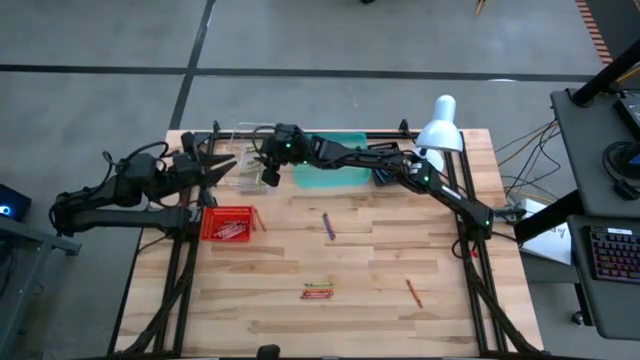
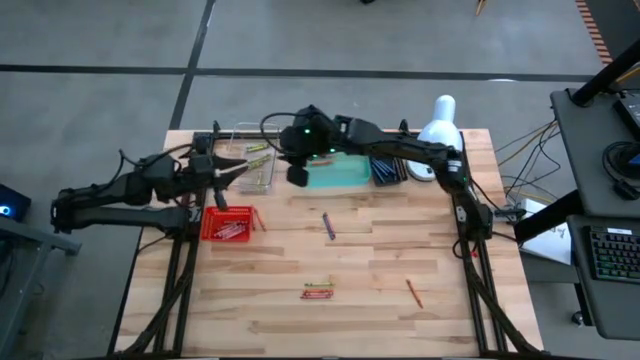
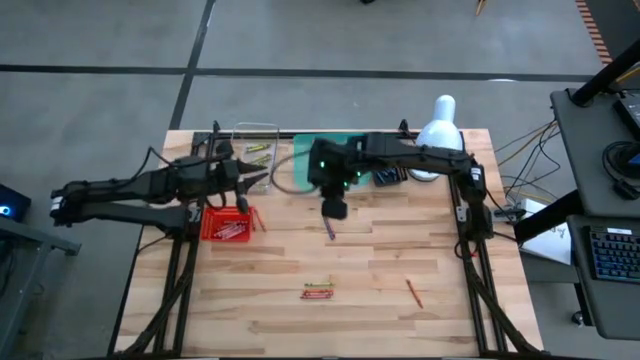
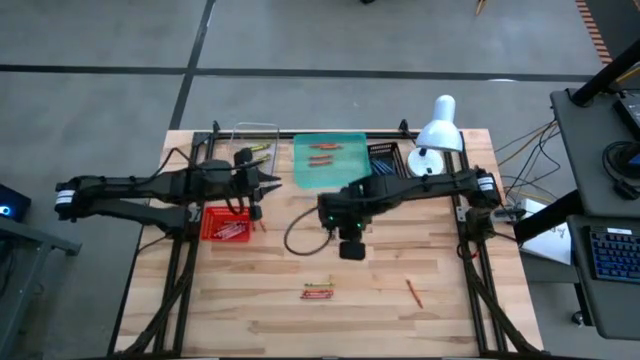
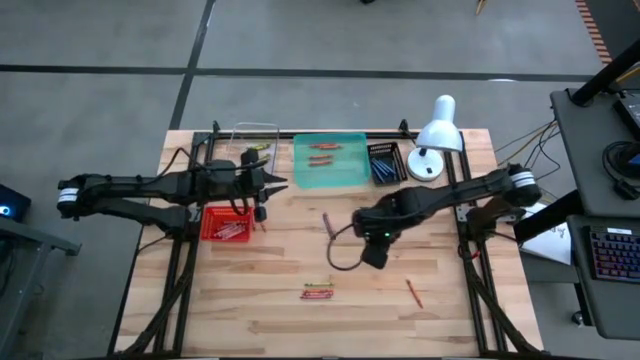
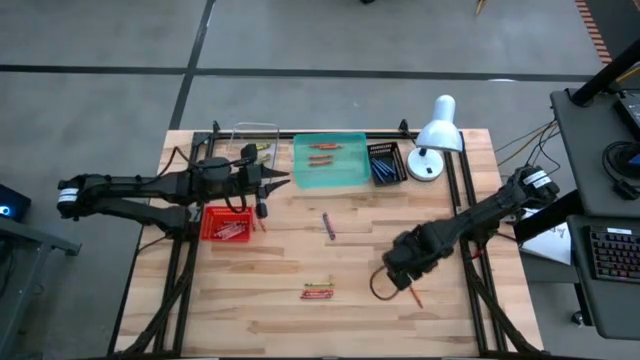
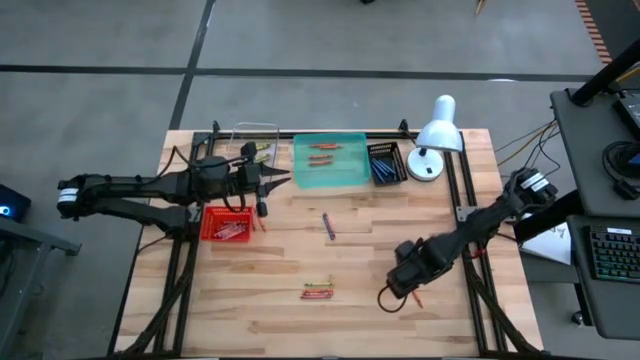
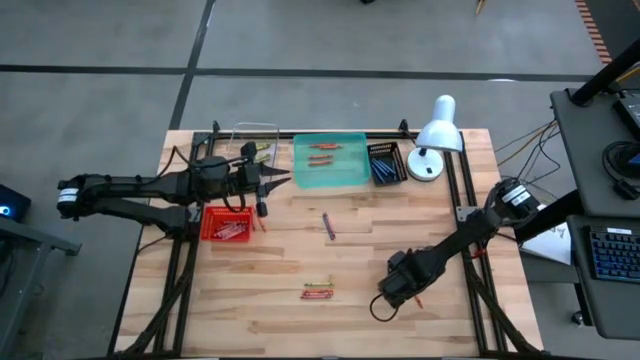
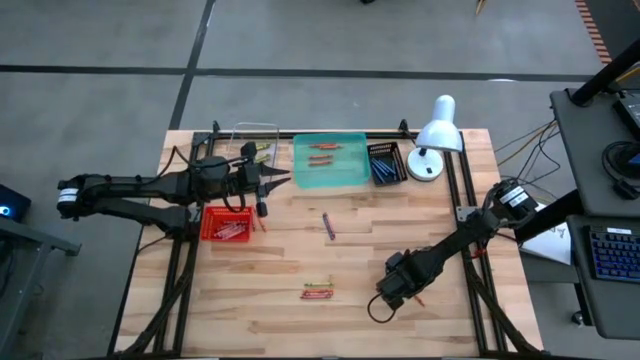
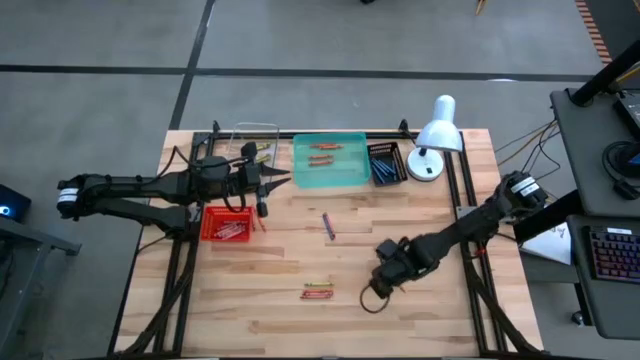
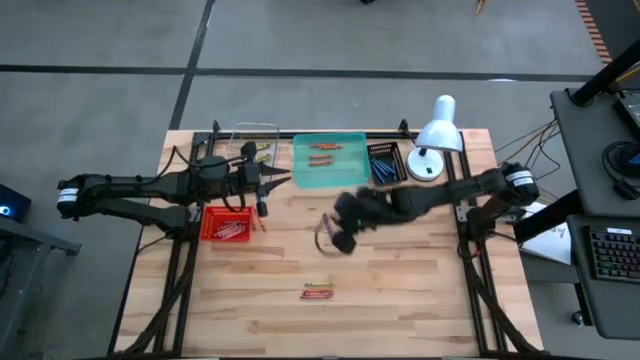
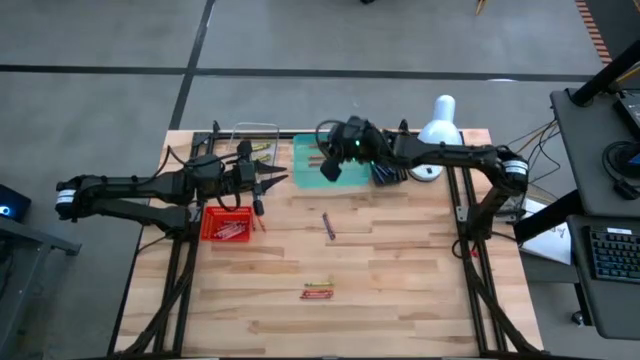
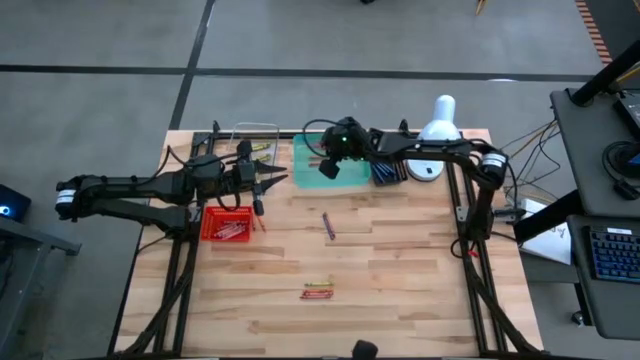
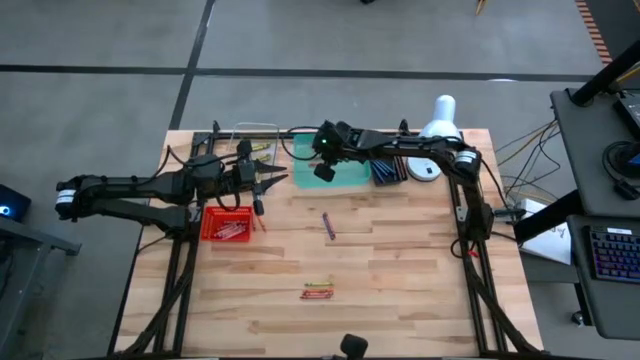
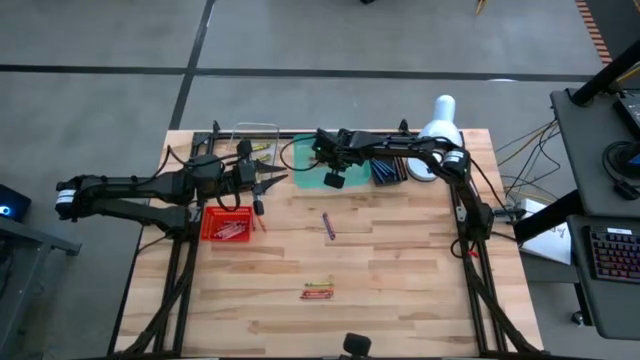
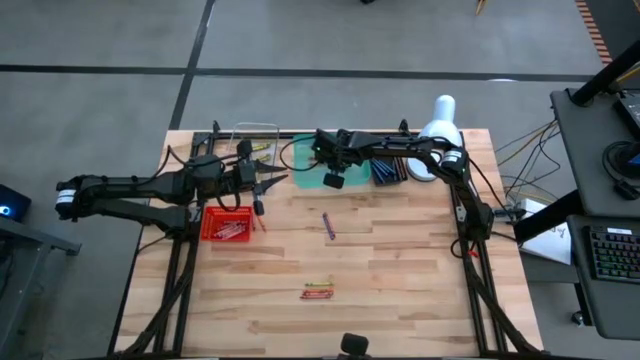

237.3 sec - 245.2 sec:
Task: Sort crayons
Put the orange crayon into the green bin

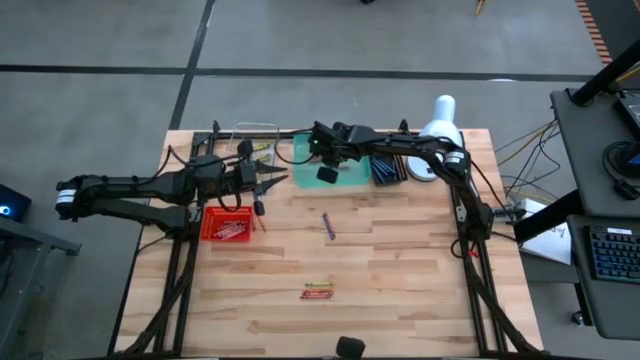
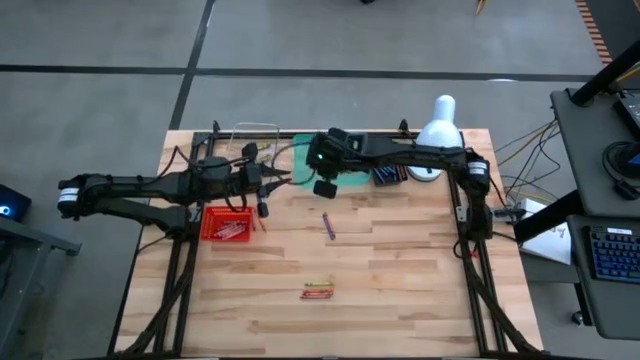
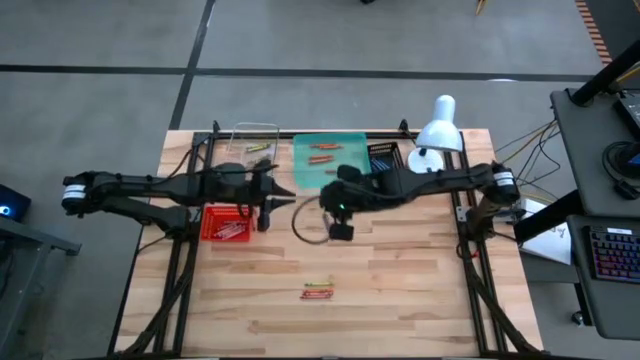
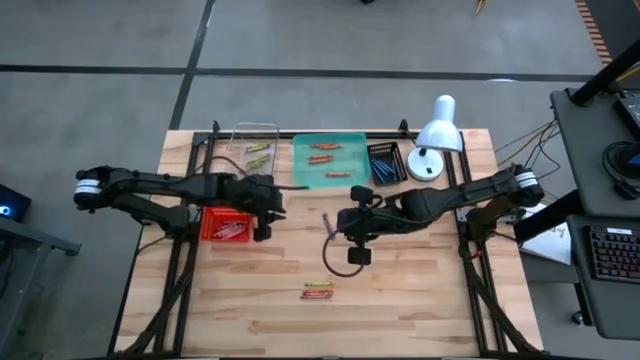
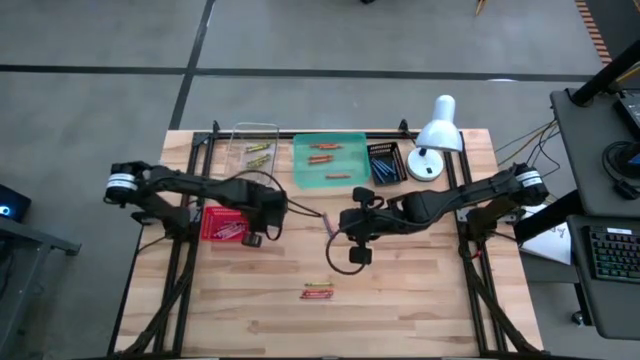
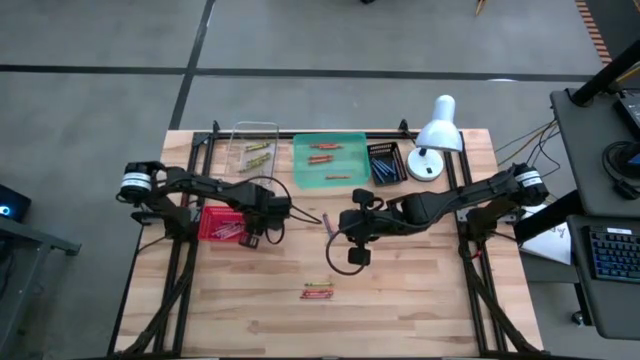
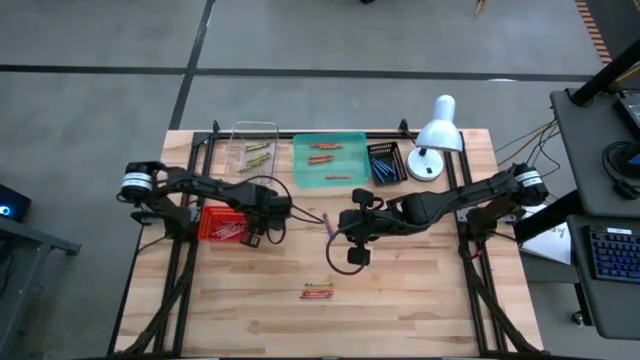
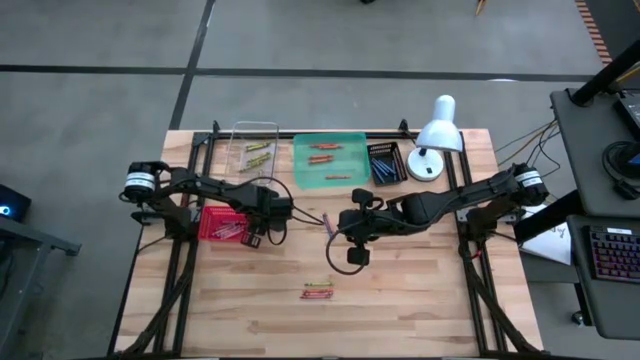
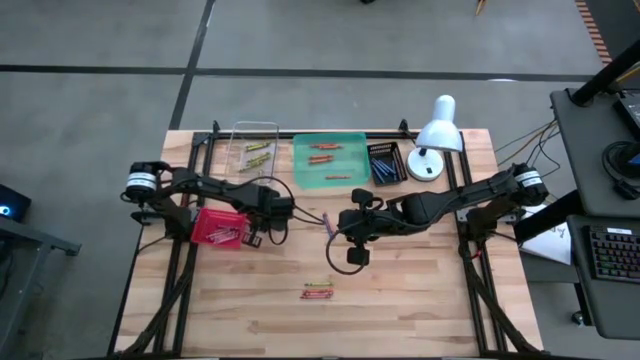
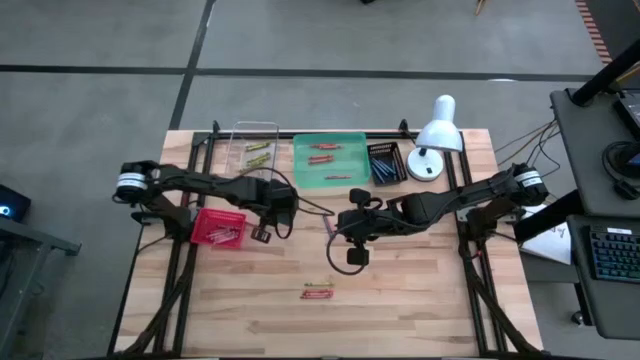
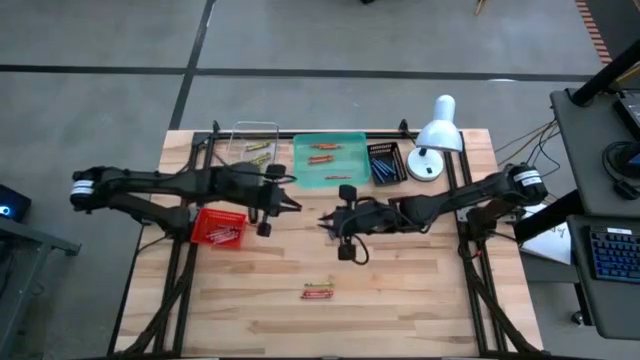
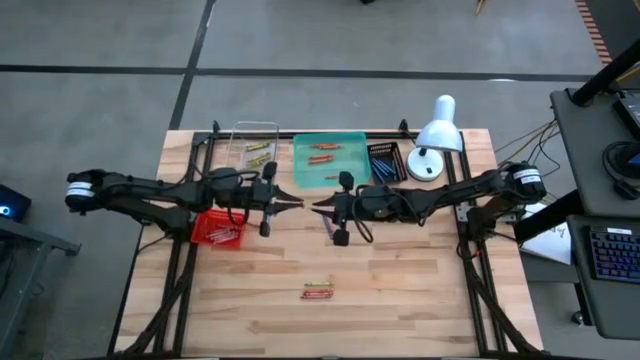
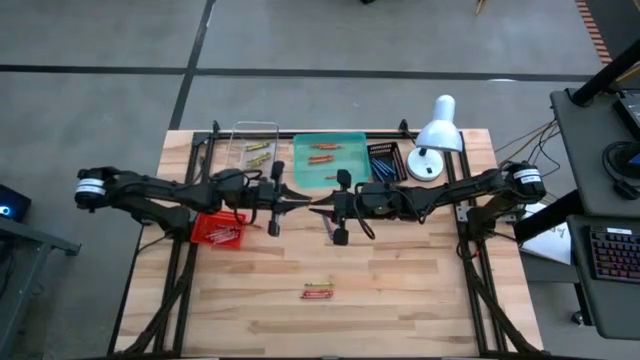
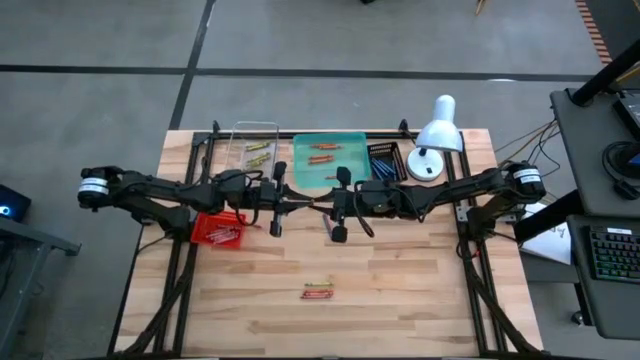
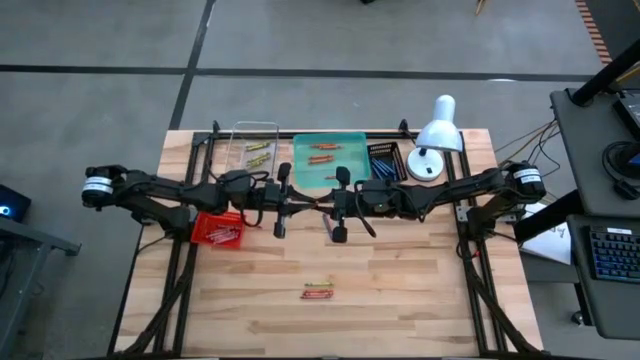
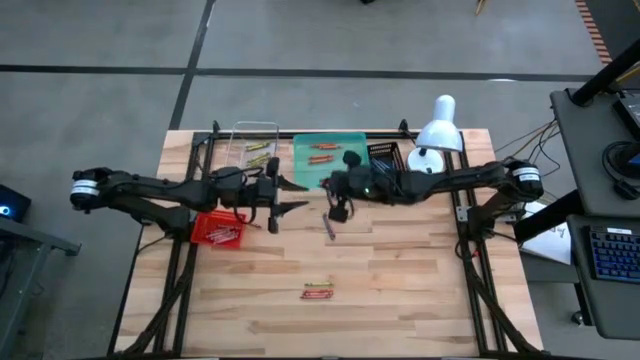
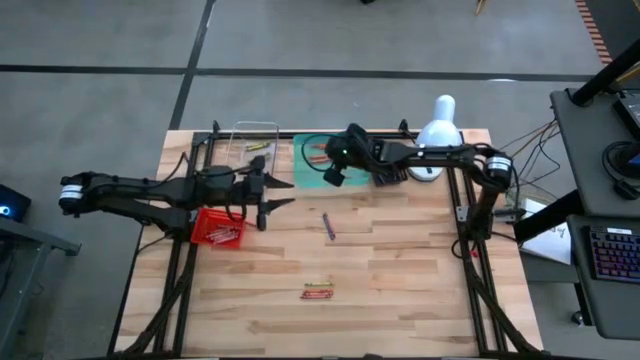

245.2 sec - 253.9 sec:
Put the orange crayon into the green bin

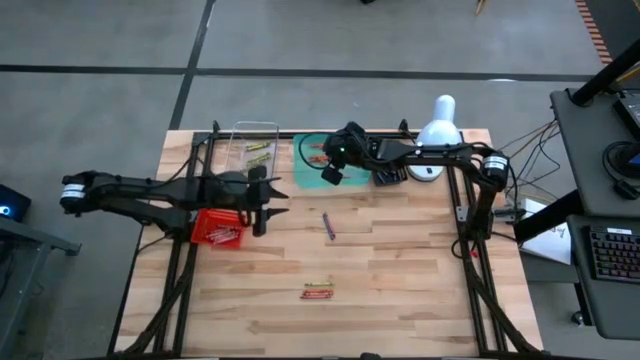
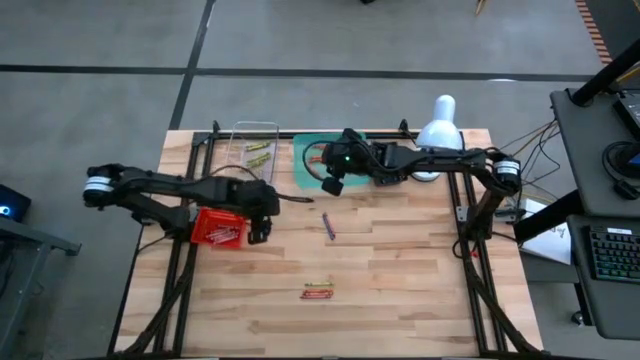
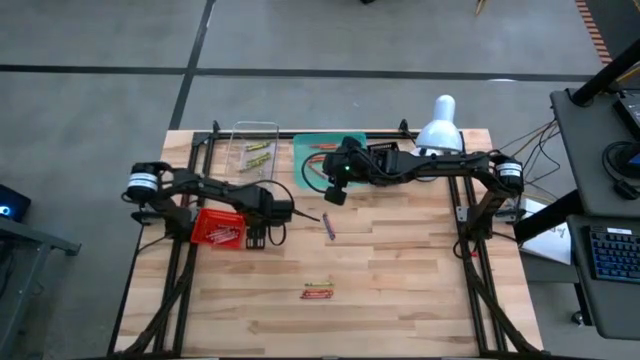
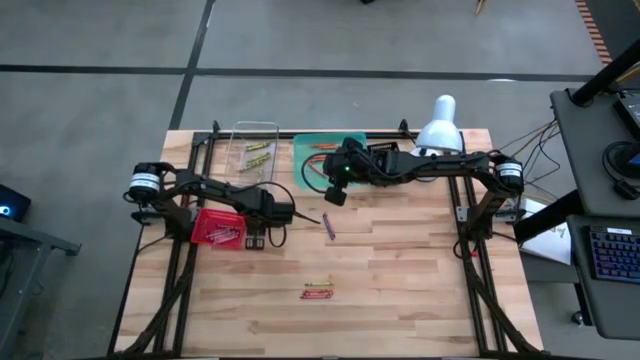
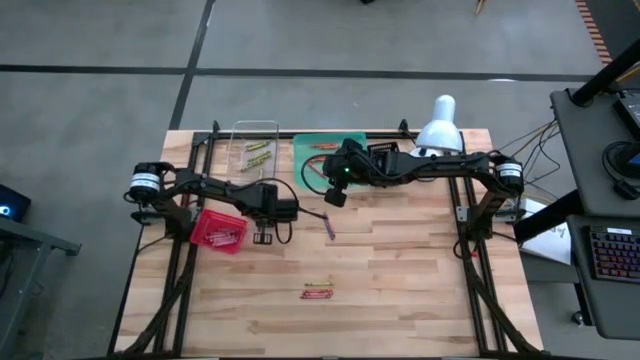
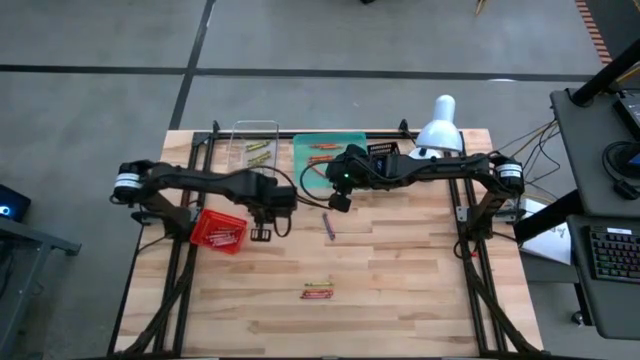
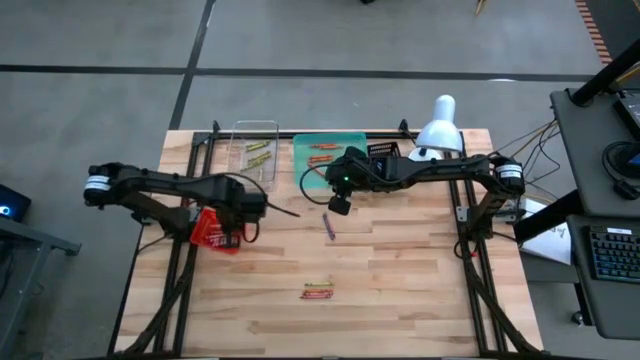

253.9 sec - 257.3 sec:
Put the red crayon into the red bin
